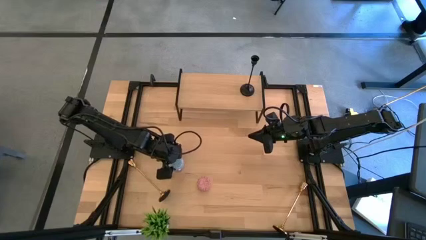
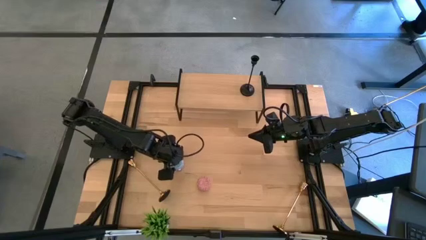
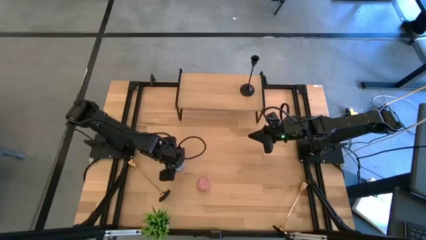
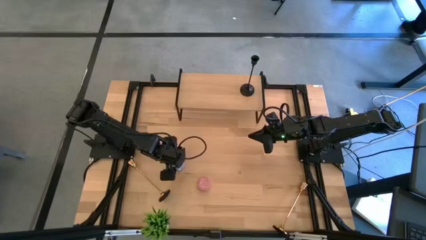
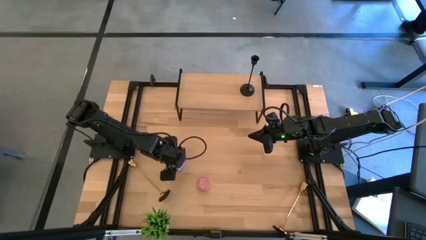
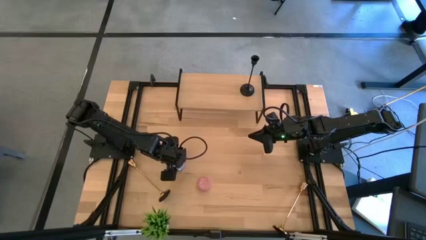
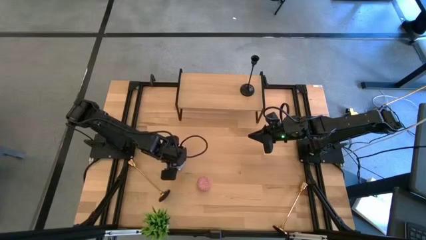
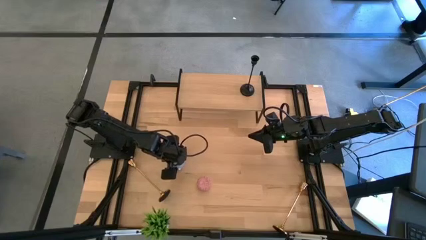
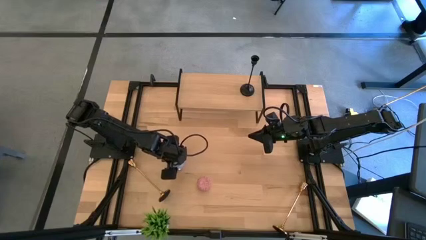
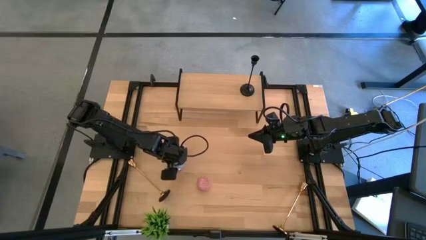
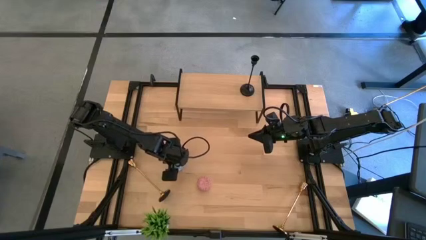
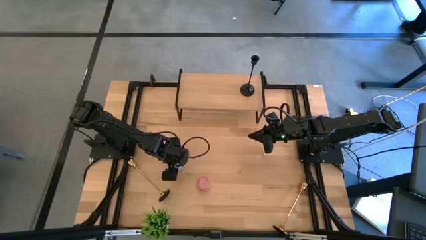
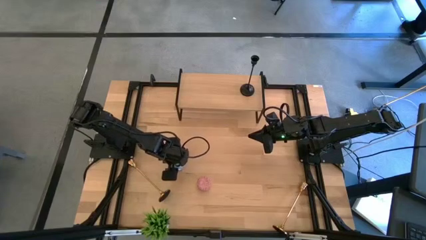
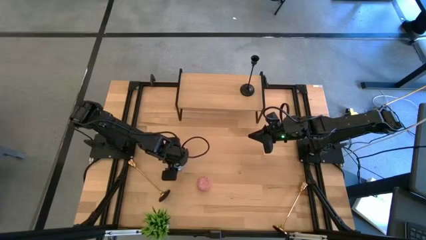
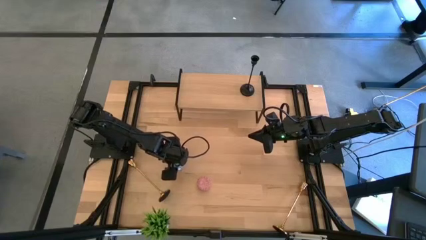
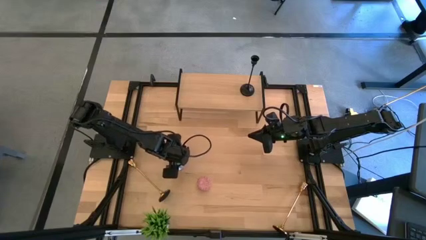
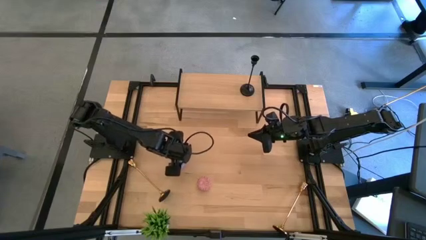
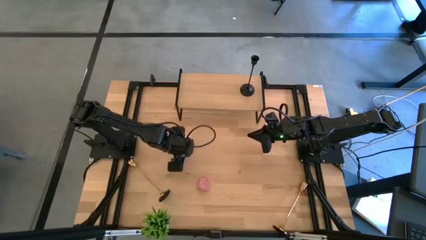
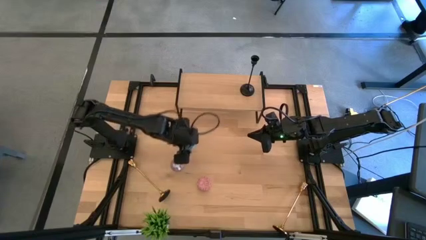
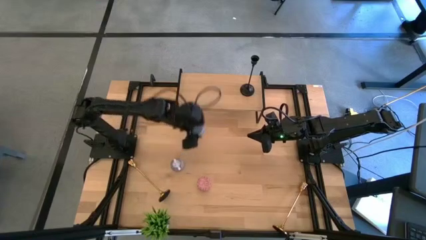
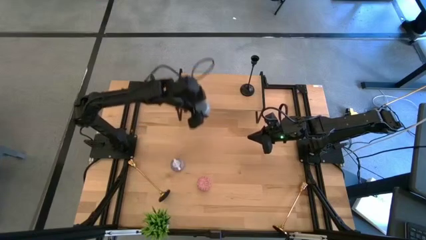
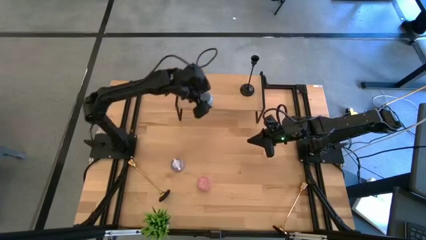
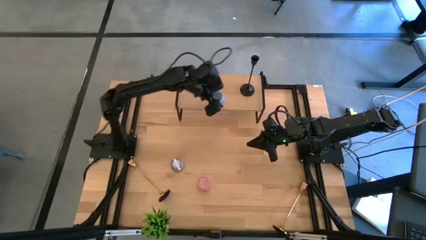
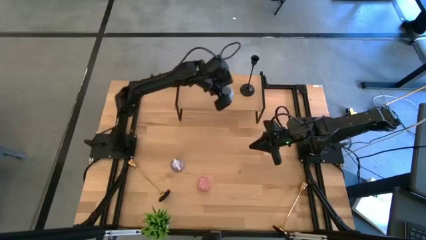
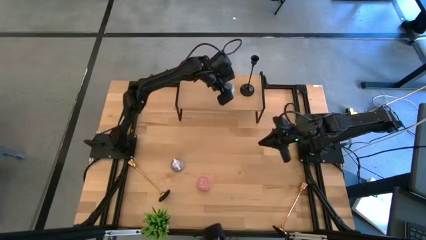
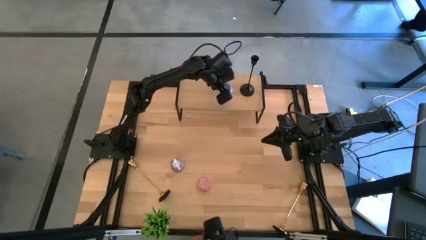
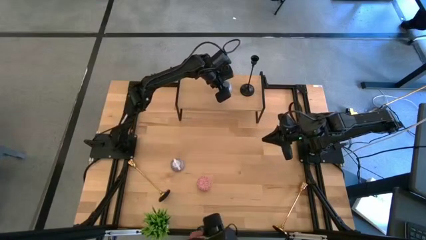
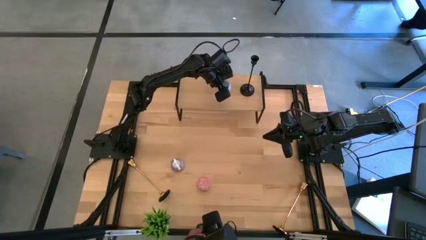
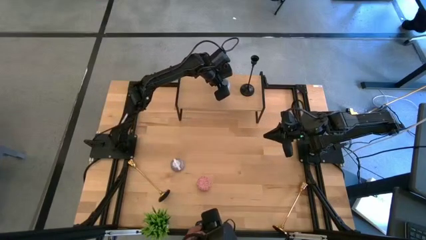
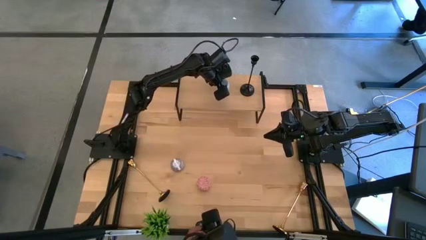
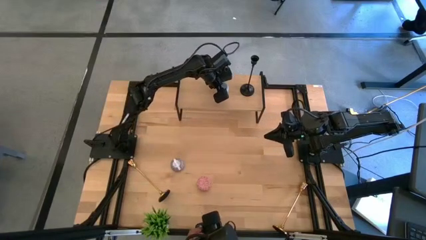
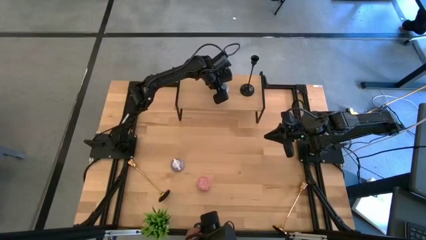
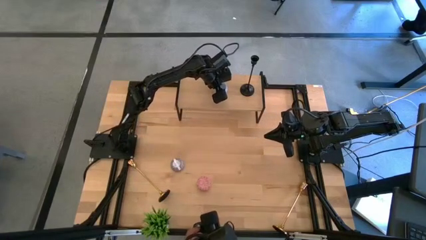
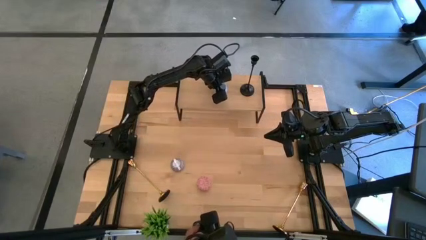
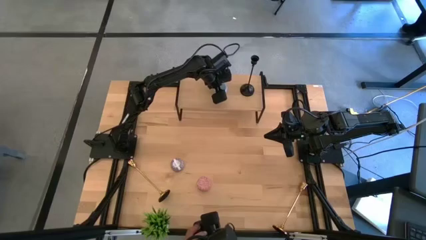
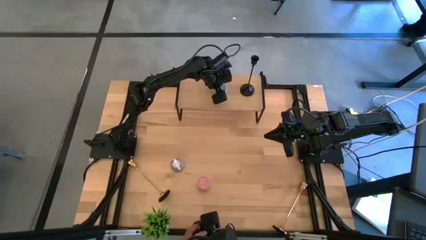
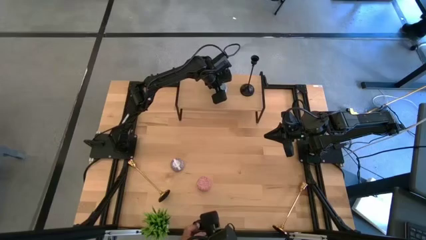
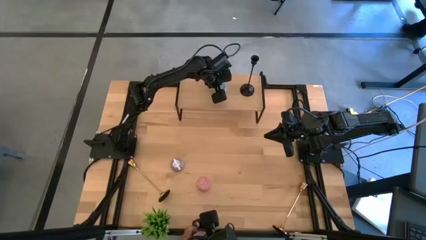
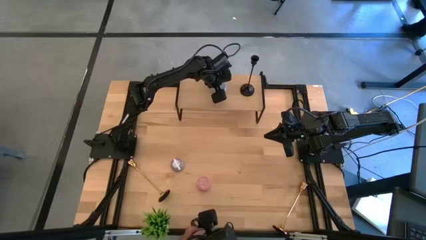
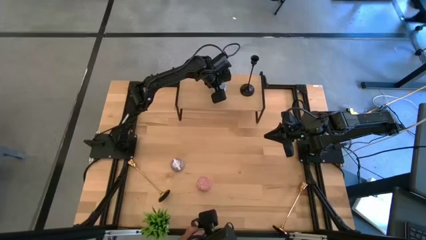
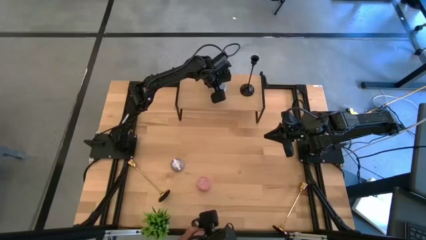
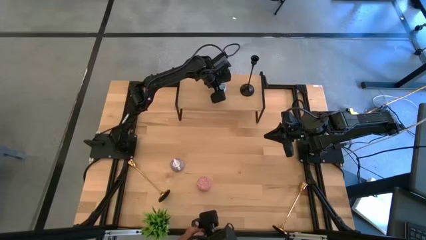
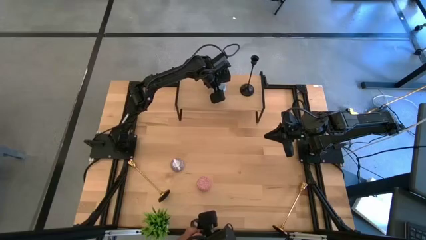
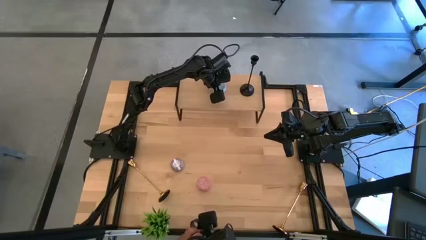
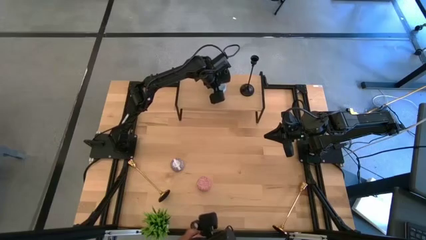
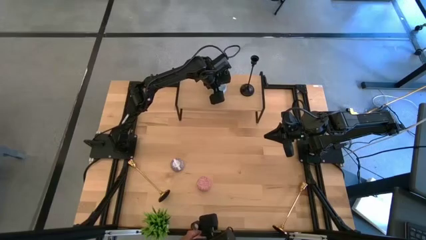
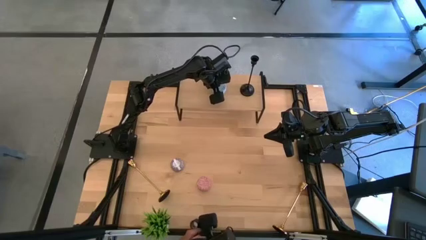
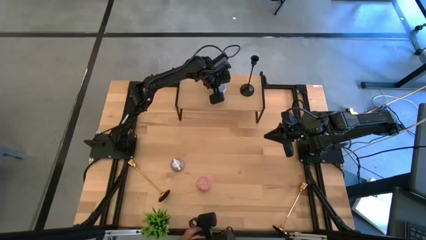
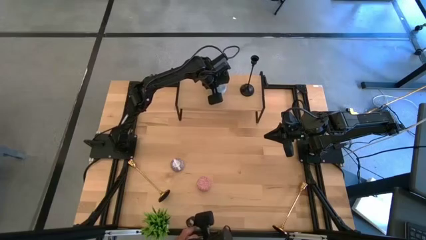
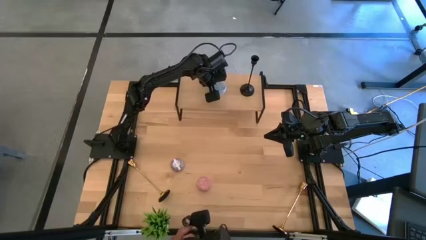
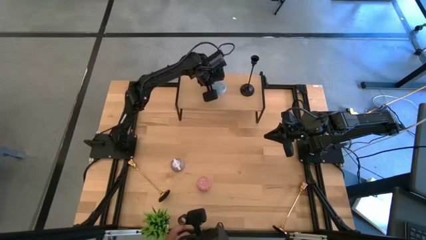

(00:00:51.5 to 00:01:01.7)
Task: Pick & Place candle stick holders
Put the blue scented candle on the shelf

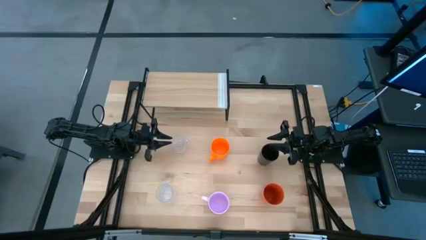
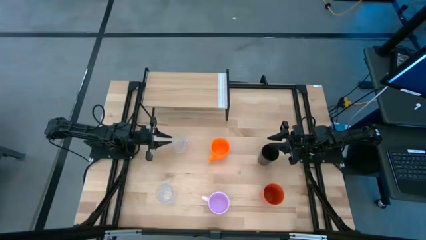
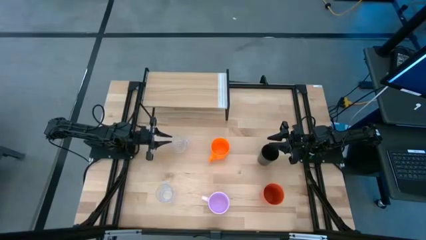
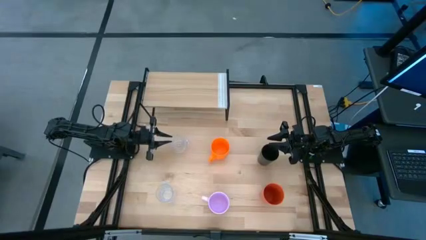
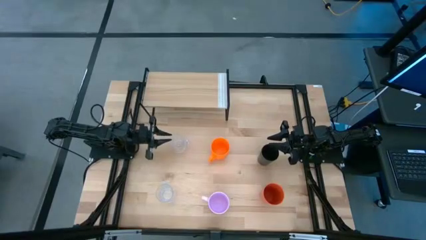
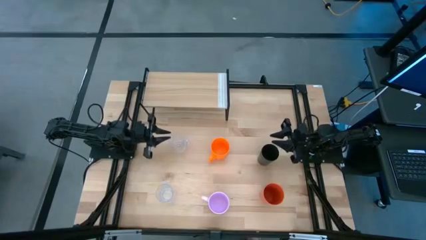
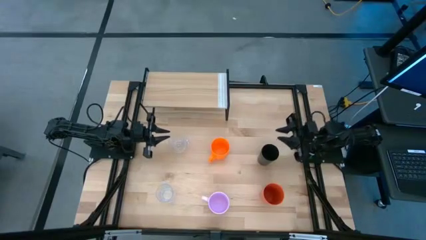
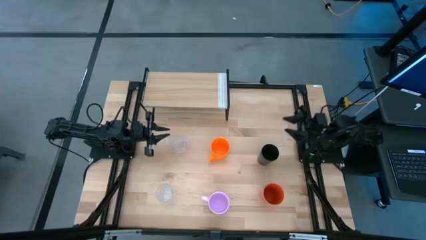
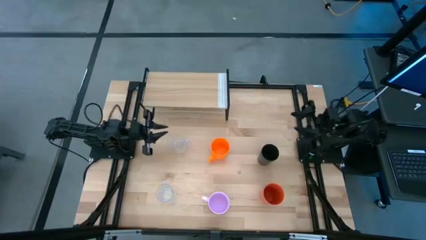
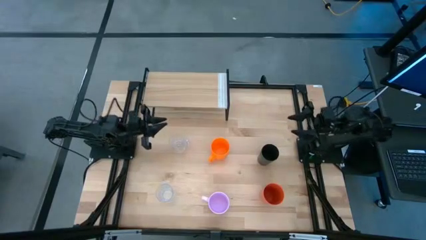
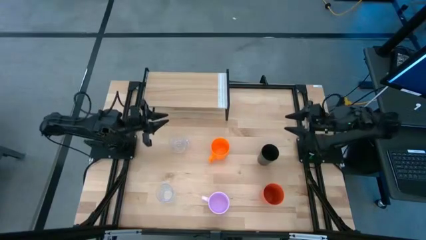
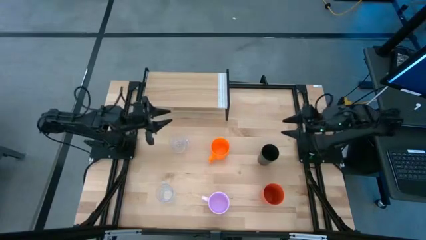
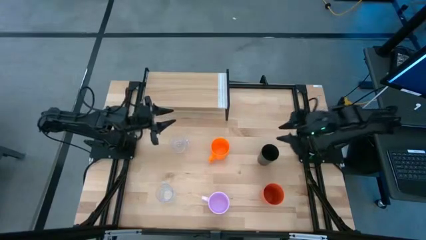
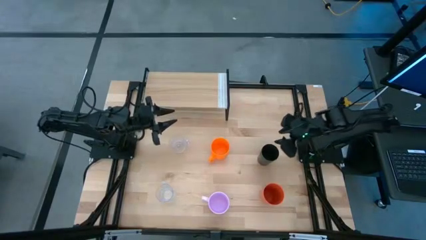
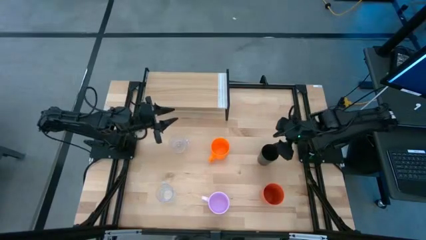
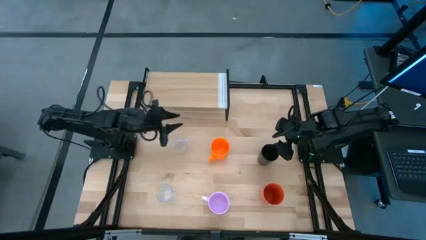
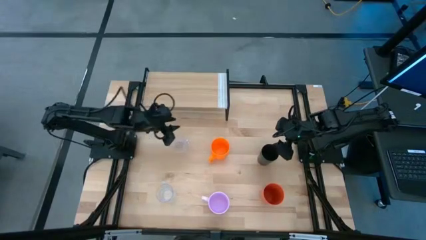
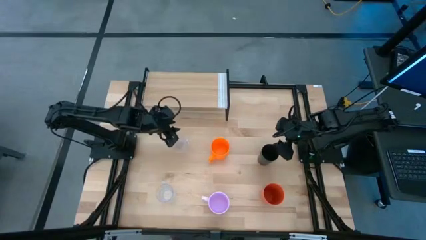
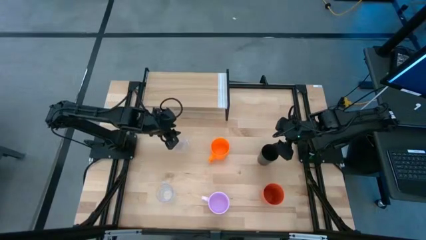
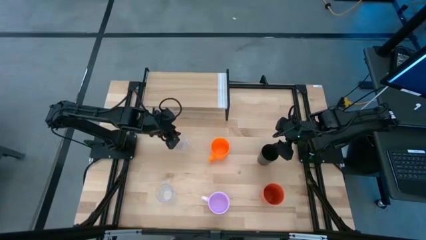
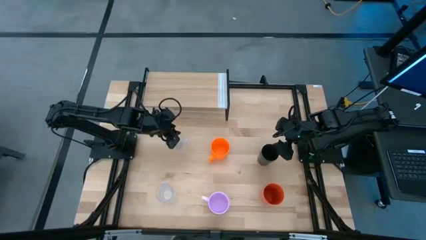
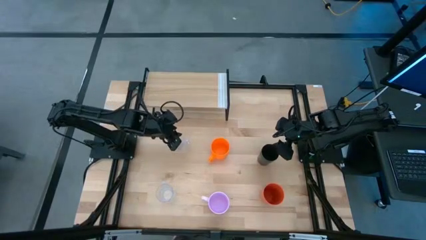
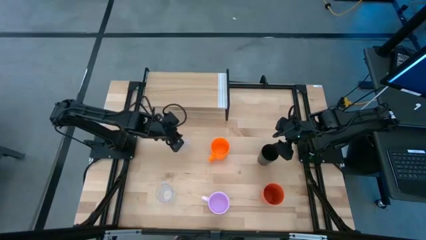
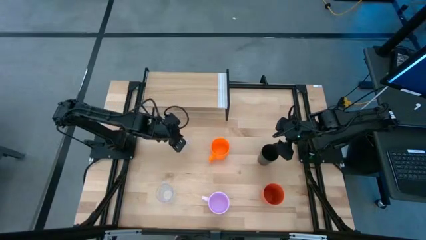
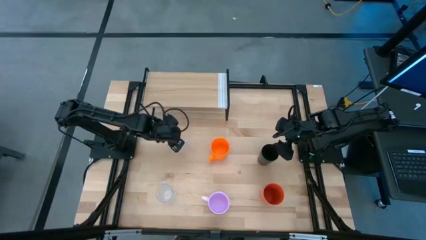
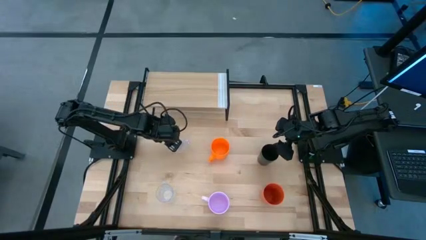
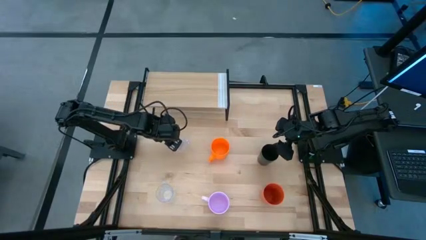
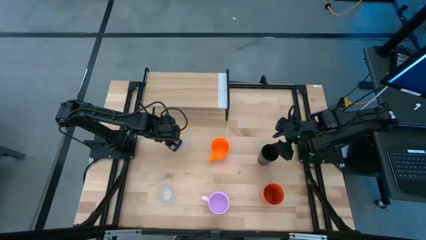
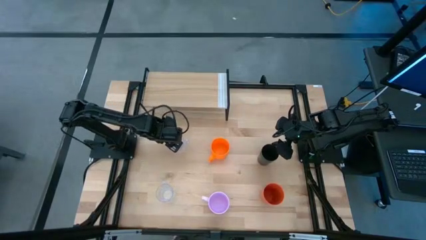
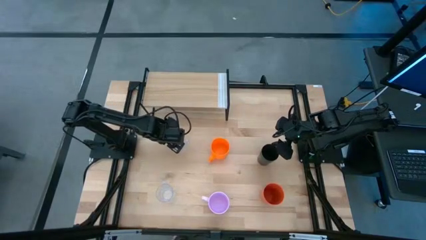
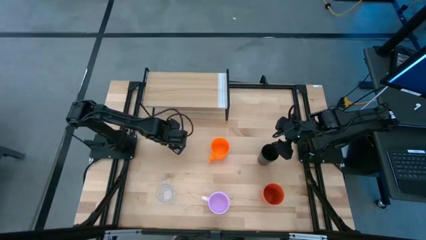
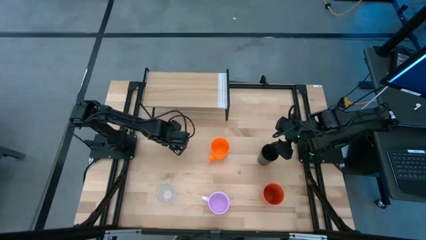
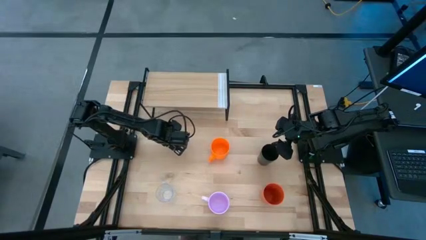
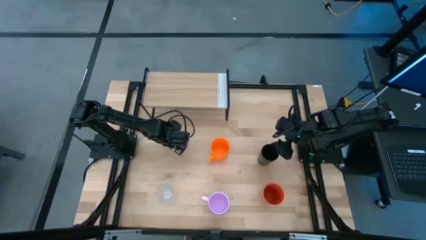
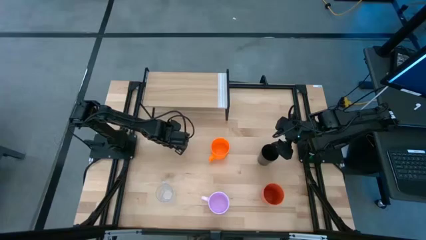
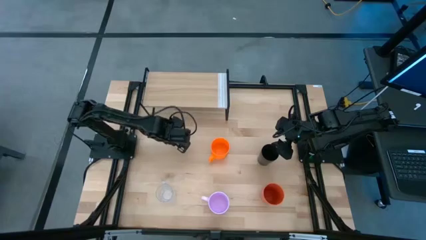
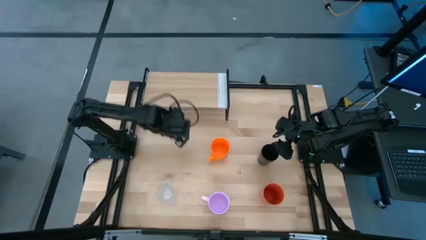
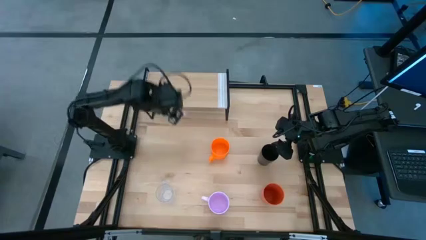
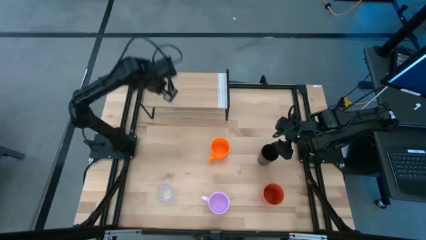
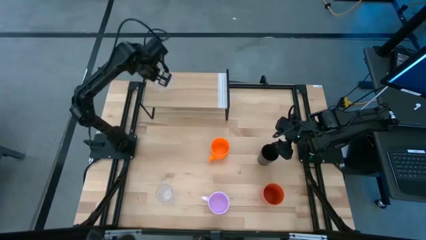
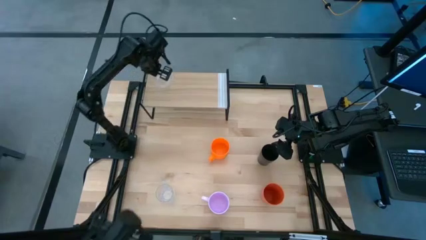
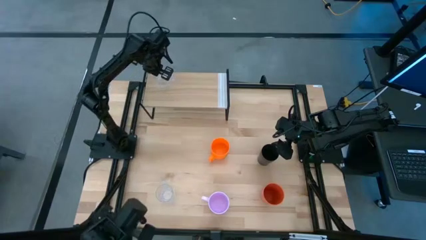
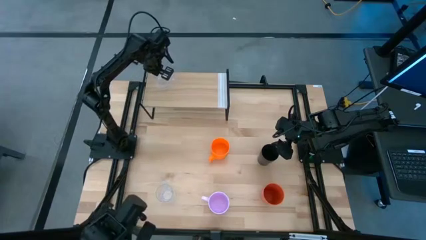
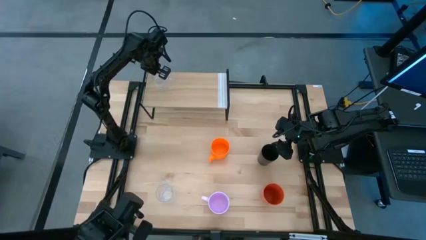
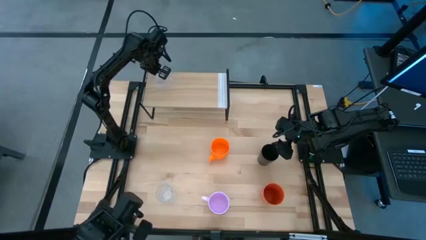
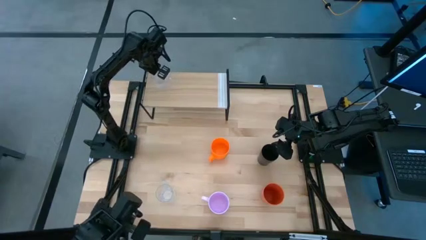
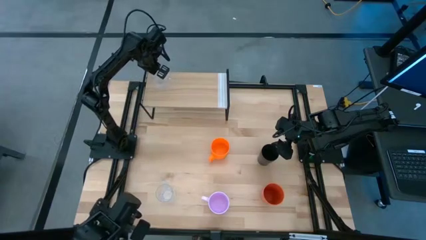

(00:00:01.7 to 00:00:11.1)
Task: Stack small to large cups/mugs on shelf
Put the top transparent mug on the shelf
